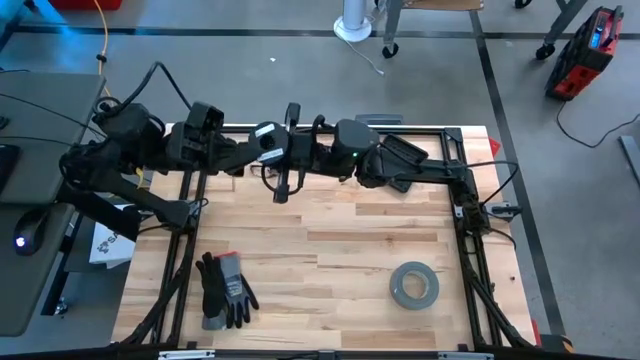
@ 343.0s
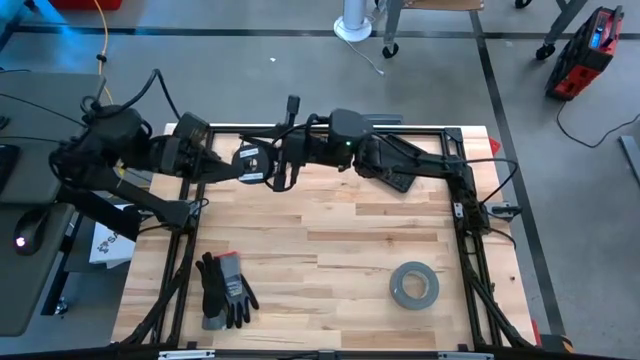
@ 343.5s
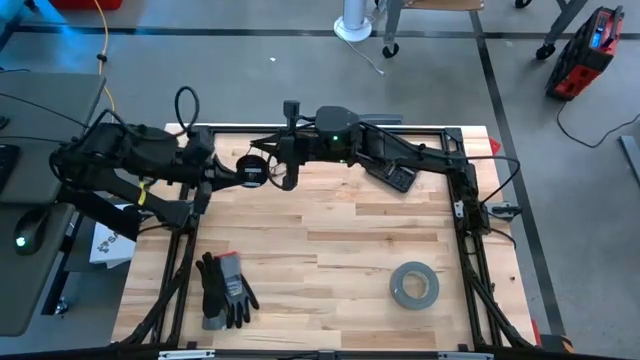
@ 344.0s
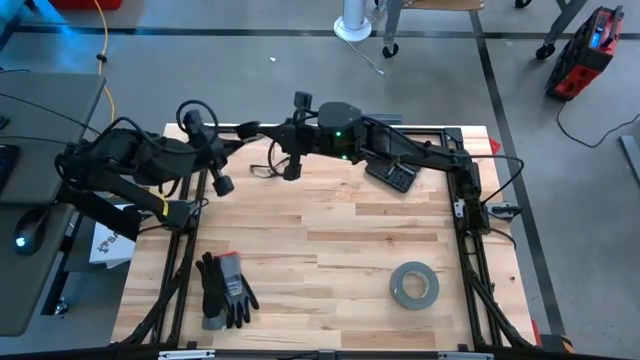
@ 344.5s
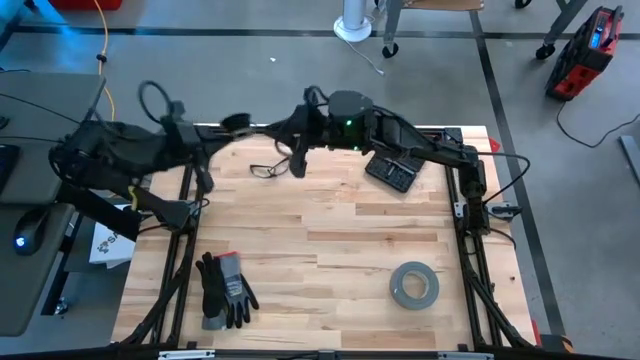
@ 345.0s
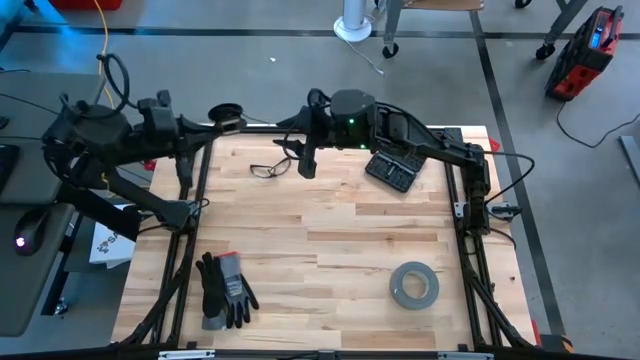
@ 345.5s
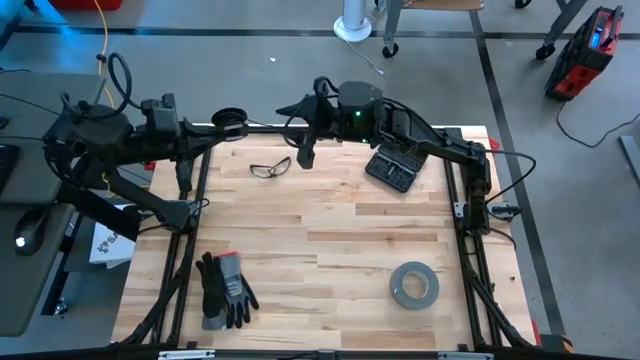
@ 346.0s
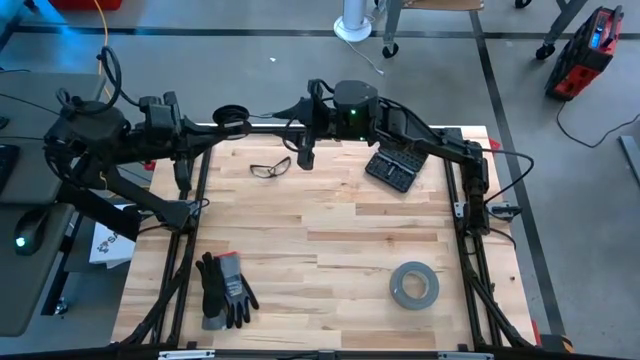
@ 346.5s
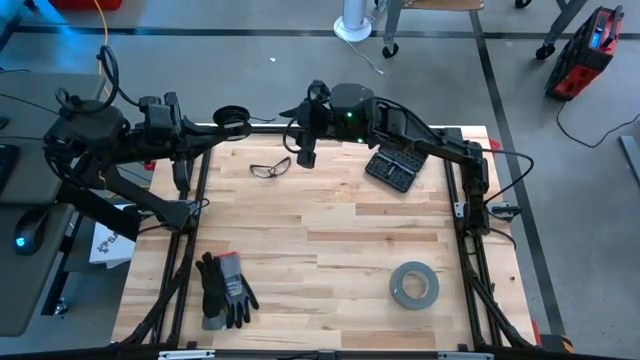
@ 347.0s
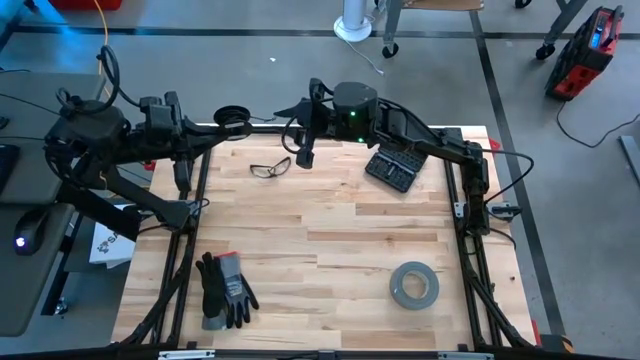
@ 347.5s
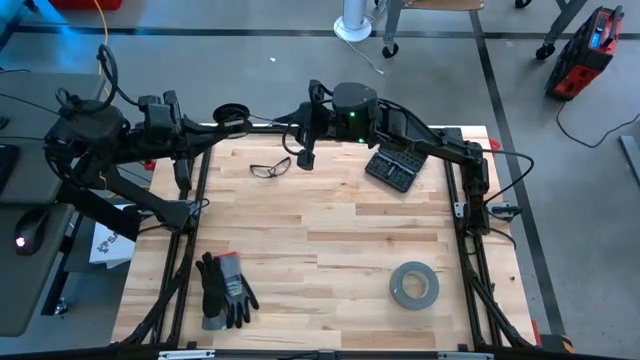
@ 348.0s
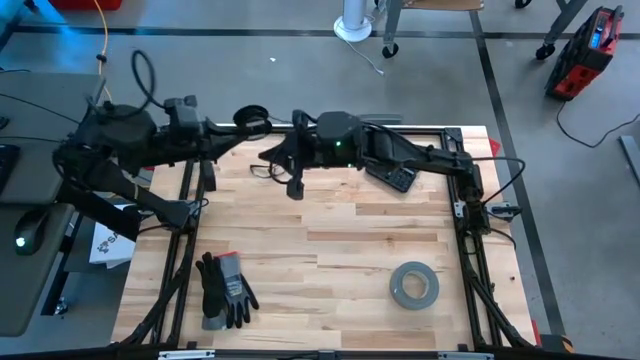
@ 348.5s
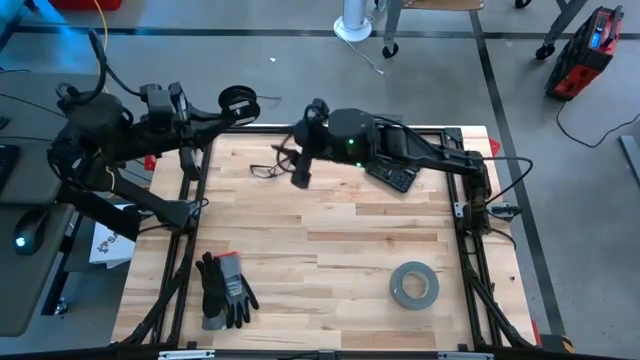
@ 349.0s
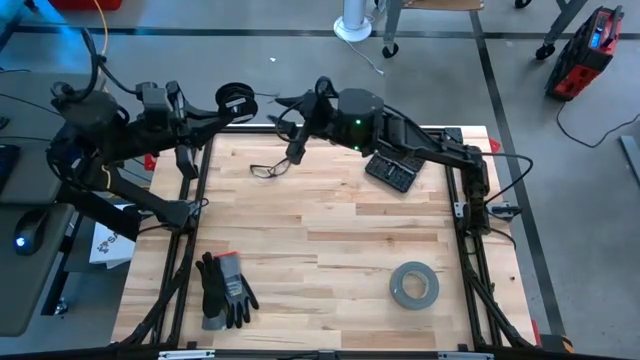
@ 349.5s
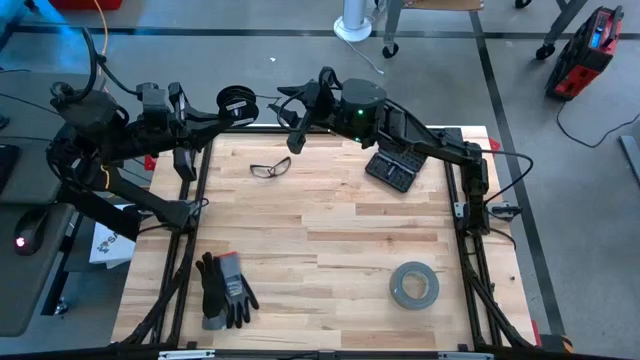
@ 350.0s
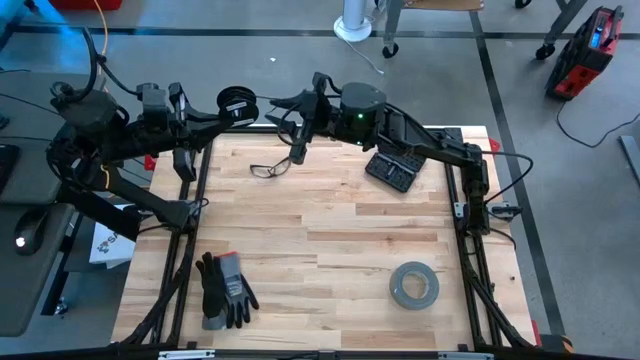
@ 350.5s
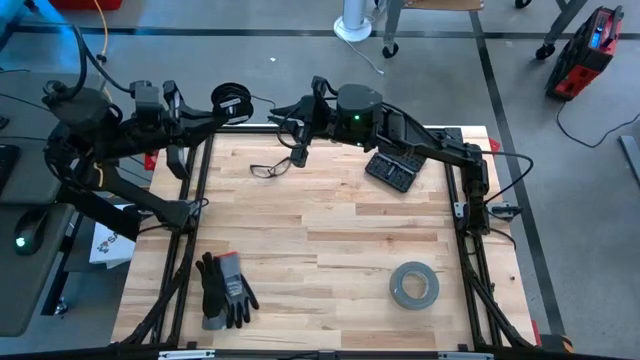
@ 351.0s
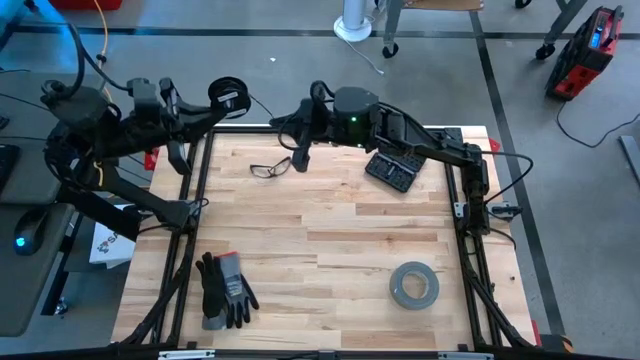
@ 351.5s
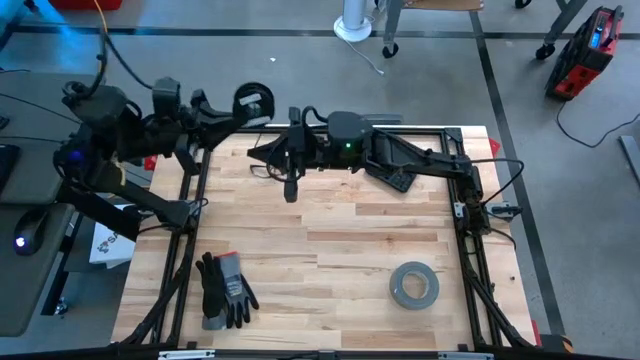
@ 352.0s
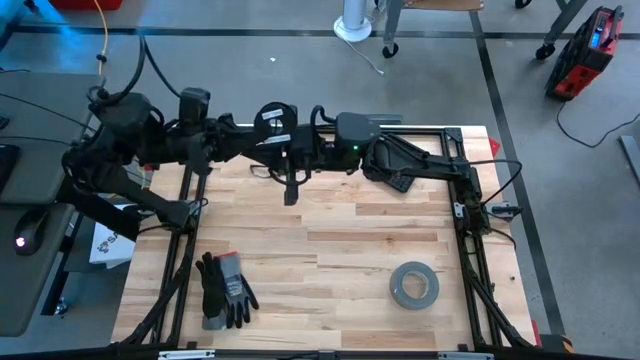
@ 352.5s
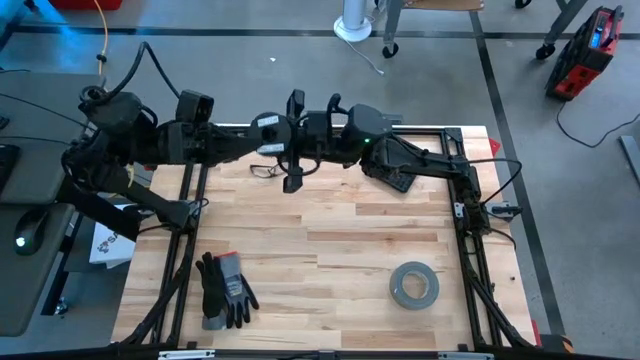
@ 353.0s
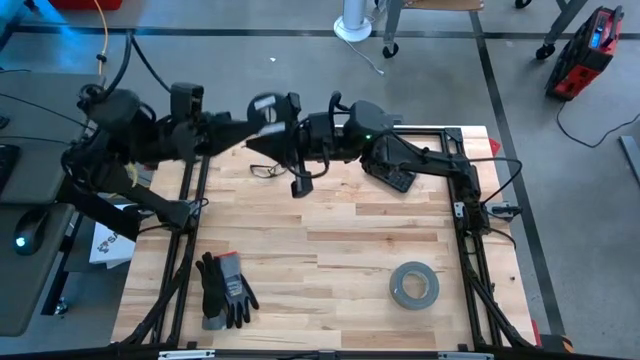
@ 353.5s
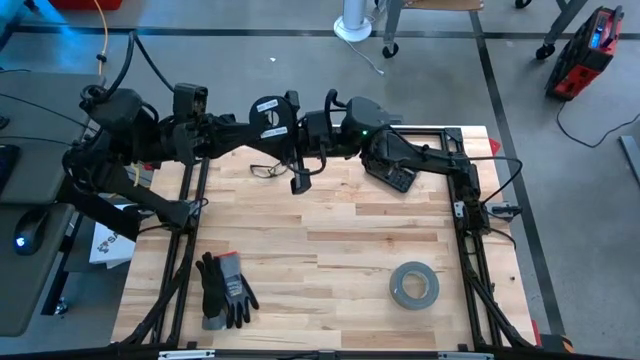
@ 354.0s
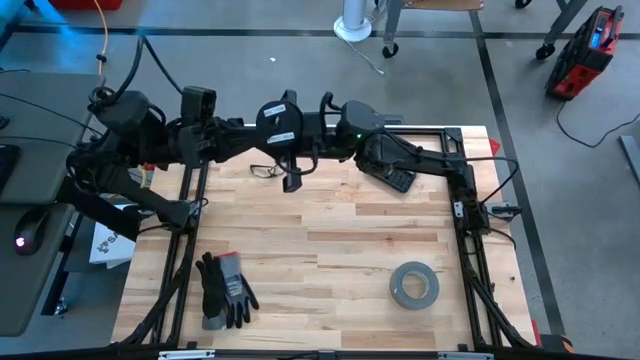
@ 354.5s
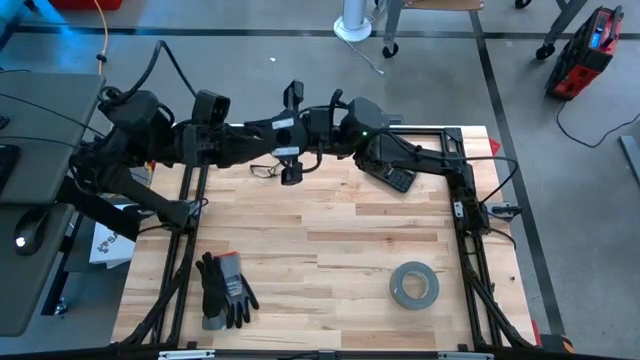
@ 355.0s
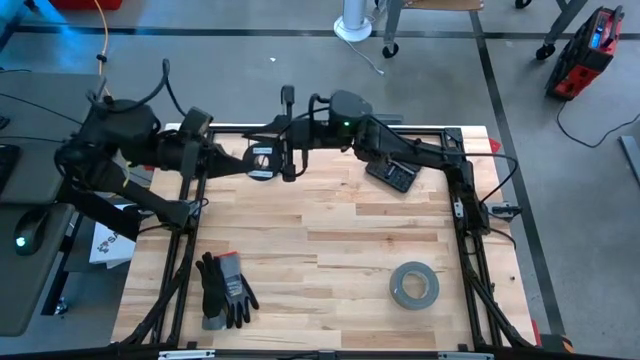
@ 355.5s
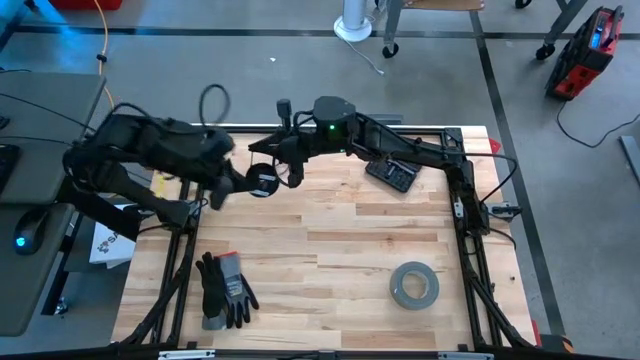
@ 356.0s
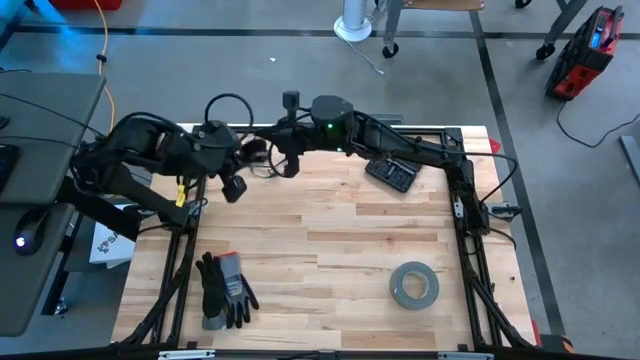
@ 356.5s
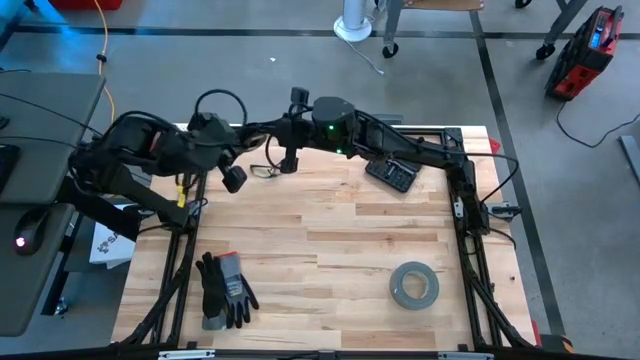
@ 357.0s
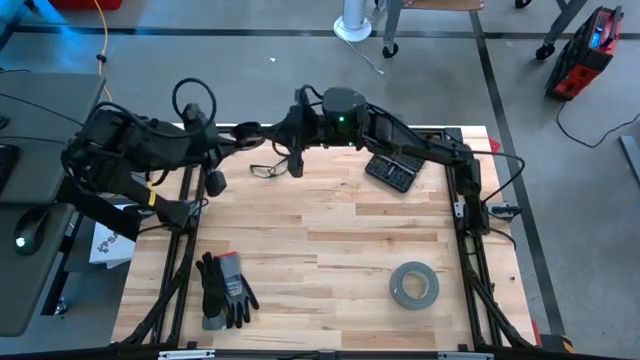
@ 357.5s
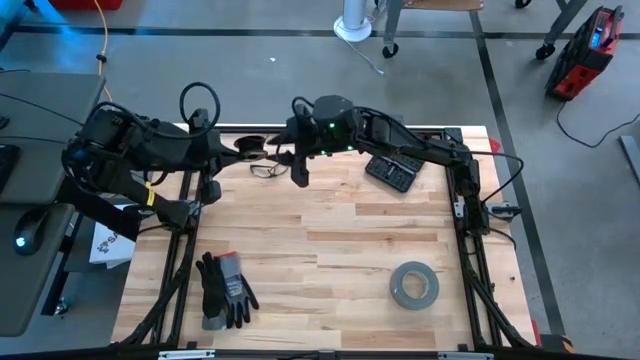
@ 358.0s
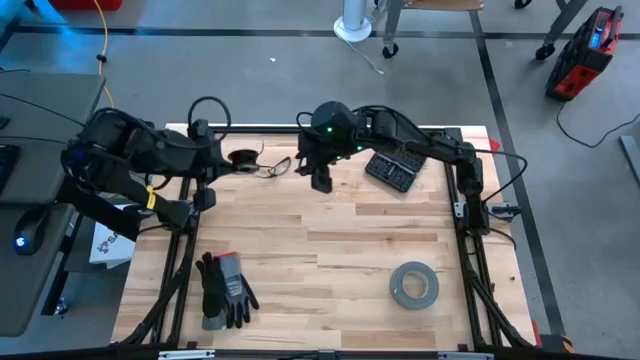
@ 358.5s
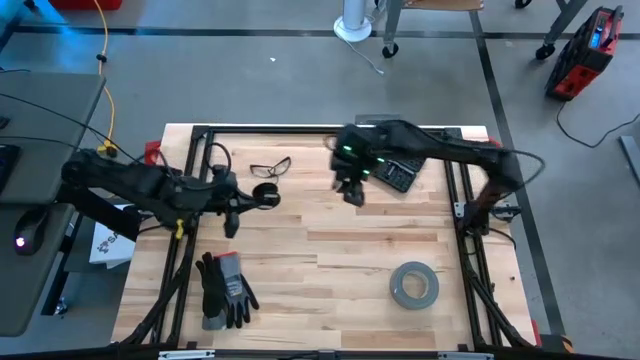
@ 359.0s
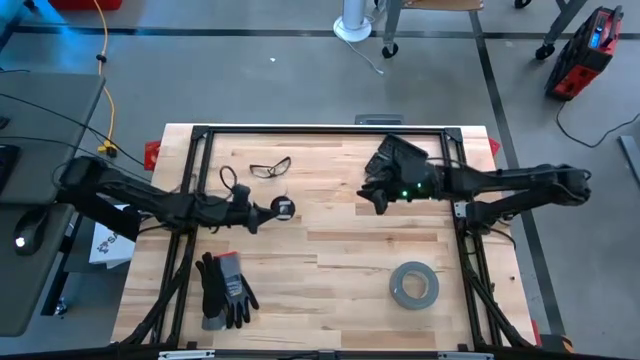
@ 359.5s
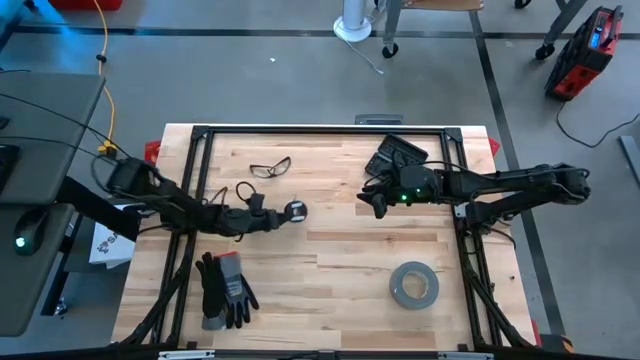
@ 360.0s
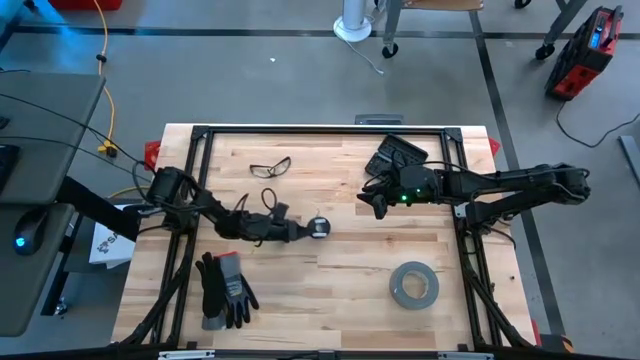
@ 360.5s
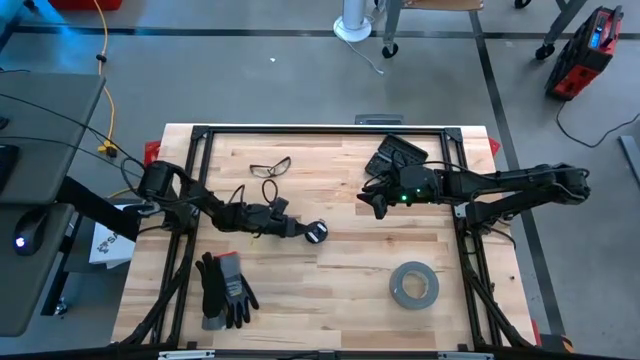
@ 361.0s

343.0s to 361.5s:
Task: Coil cords
Coil the black wire on the black spool
